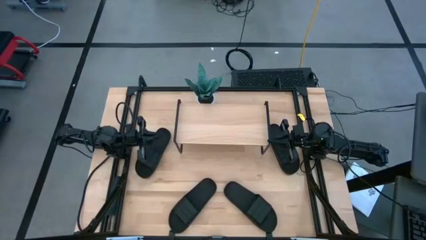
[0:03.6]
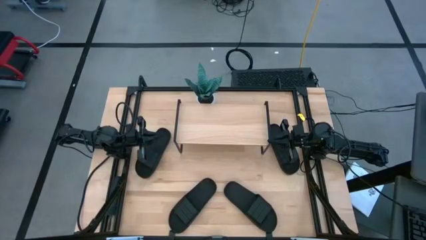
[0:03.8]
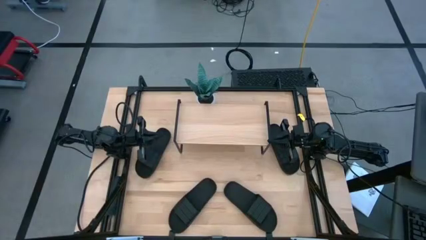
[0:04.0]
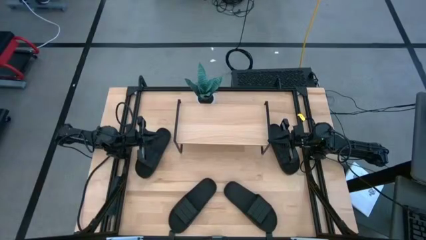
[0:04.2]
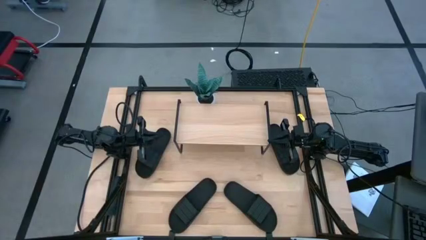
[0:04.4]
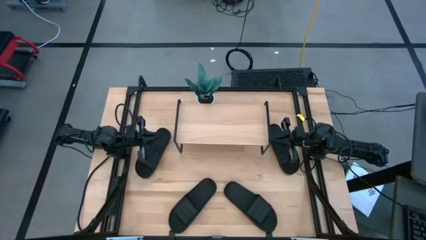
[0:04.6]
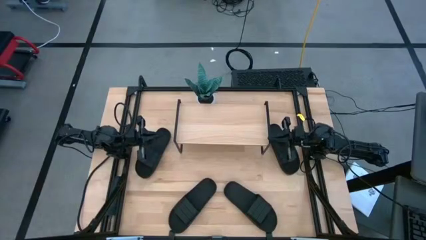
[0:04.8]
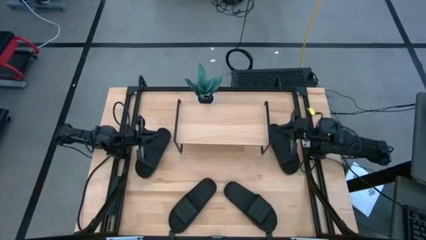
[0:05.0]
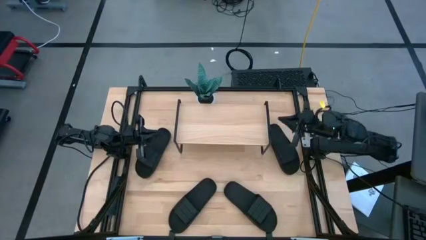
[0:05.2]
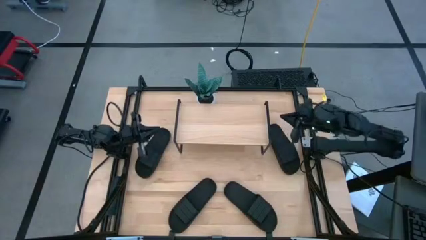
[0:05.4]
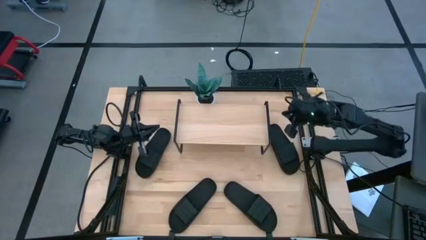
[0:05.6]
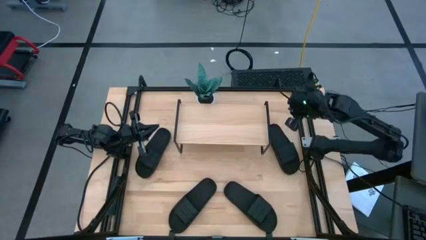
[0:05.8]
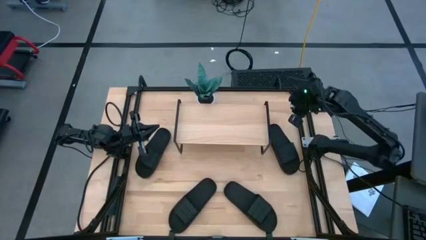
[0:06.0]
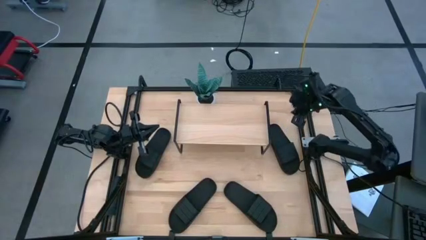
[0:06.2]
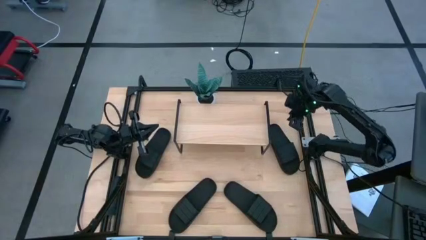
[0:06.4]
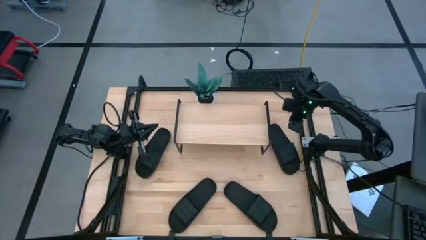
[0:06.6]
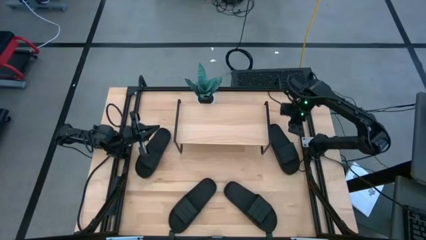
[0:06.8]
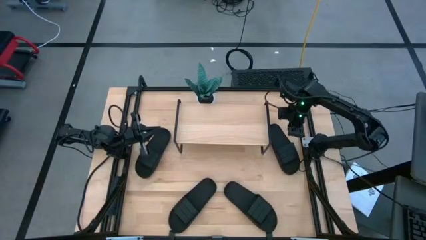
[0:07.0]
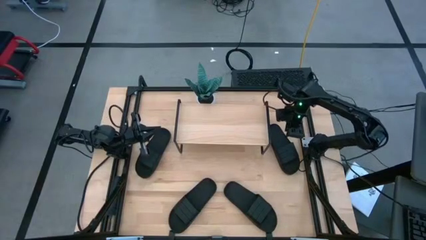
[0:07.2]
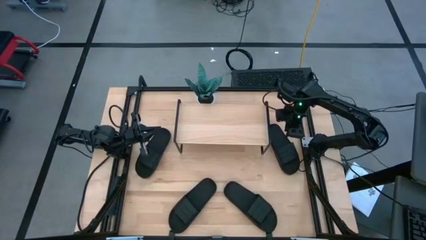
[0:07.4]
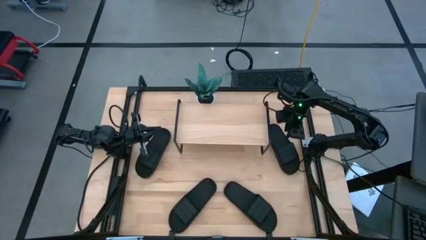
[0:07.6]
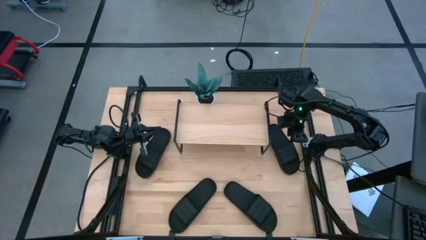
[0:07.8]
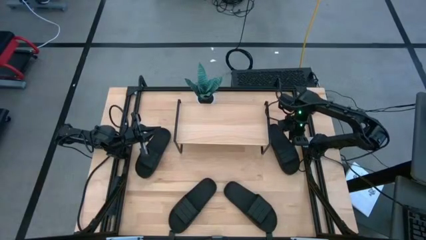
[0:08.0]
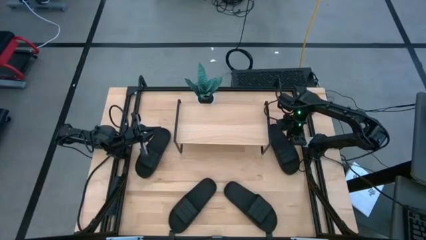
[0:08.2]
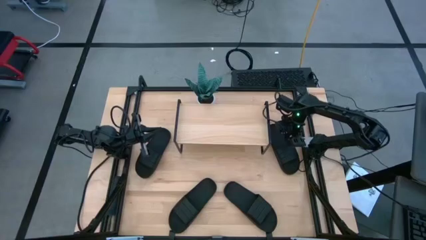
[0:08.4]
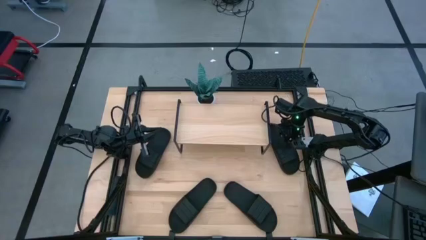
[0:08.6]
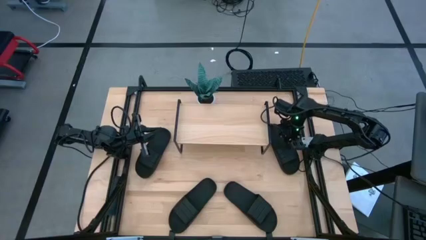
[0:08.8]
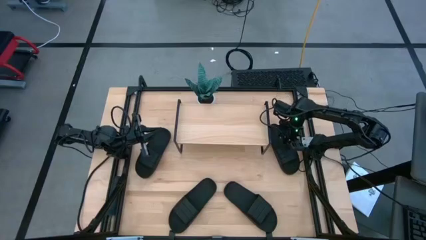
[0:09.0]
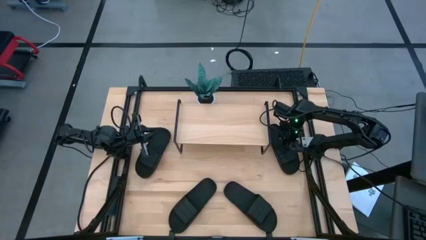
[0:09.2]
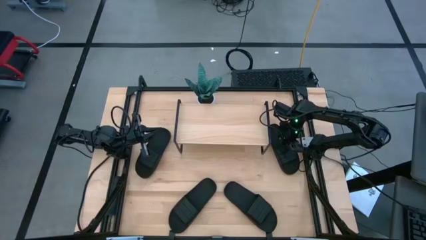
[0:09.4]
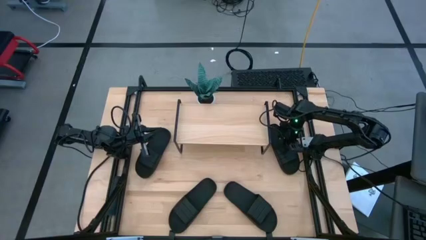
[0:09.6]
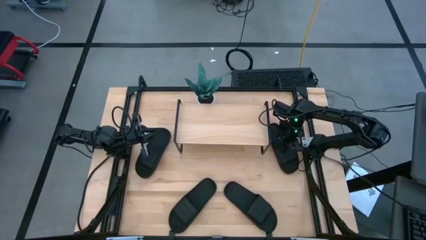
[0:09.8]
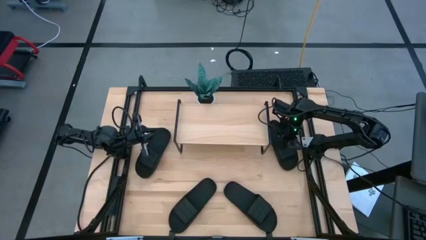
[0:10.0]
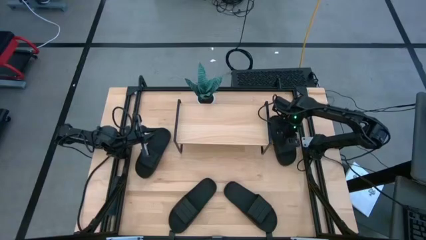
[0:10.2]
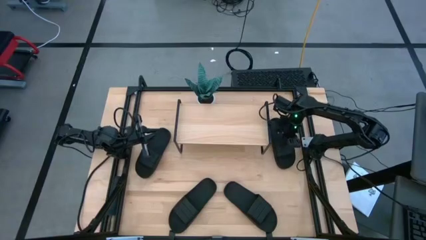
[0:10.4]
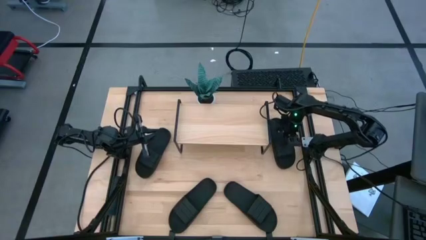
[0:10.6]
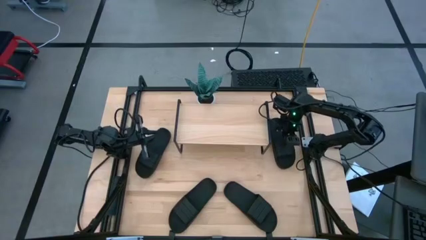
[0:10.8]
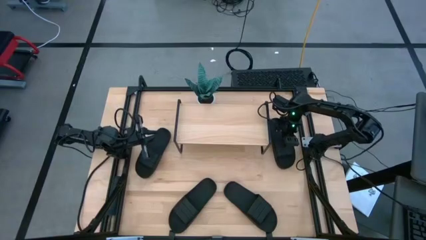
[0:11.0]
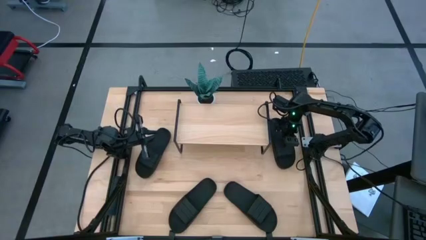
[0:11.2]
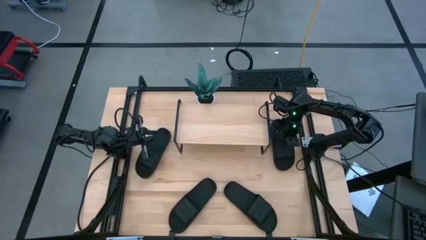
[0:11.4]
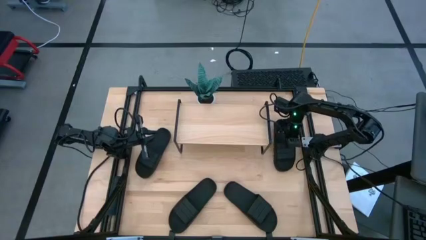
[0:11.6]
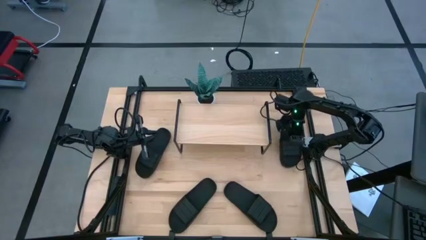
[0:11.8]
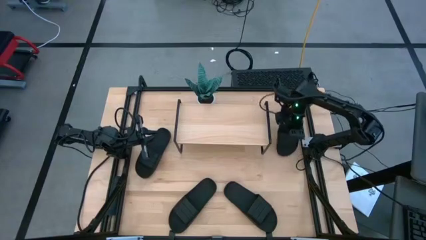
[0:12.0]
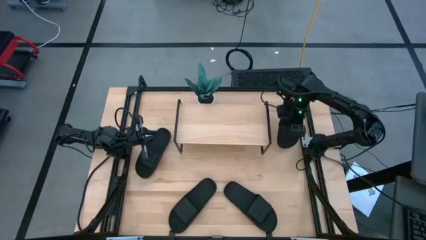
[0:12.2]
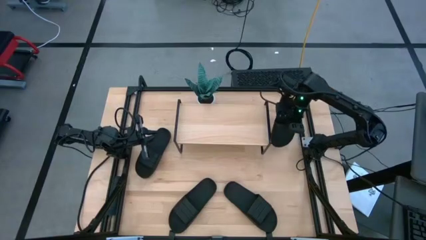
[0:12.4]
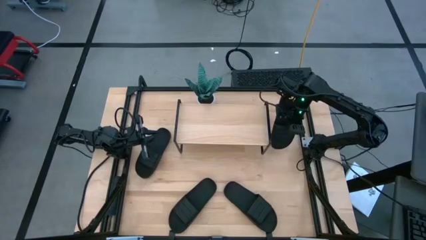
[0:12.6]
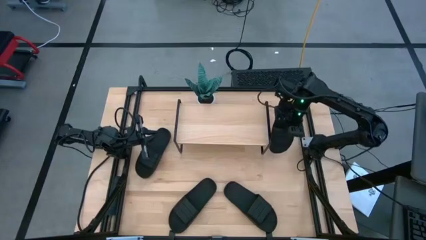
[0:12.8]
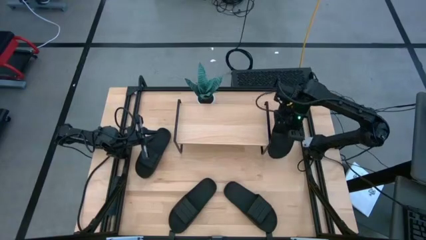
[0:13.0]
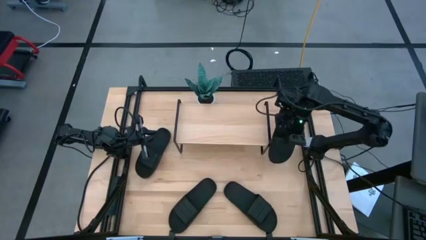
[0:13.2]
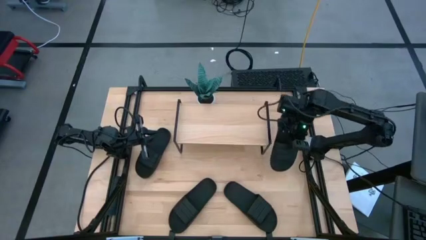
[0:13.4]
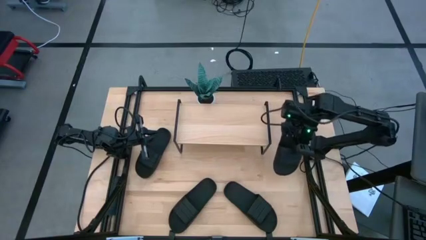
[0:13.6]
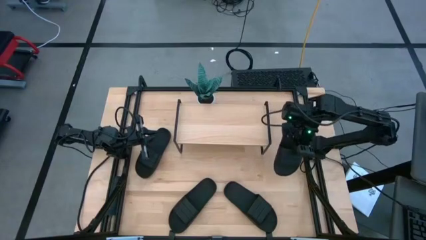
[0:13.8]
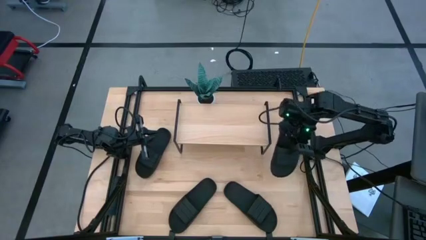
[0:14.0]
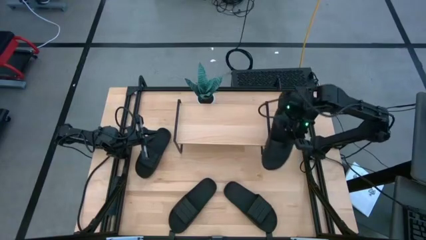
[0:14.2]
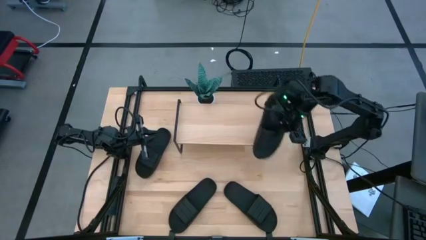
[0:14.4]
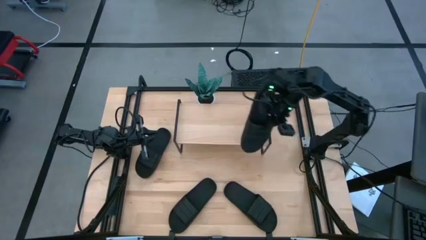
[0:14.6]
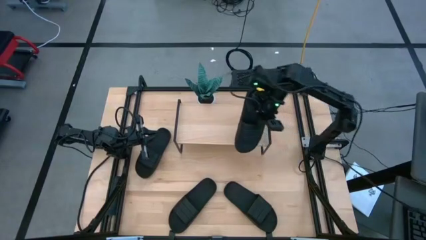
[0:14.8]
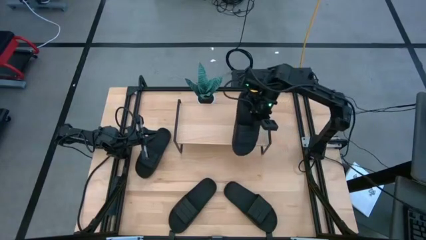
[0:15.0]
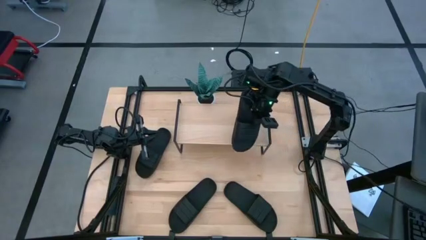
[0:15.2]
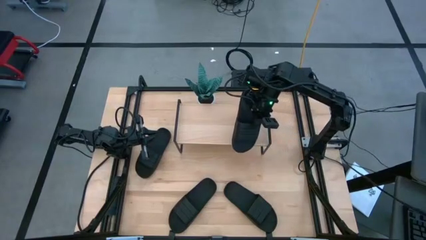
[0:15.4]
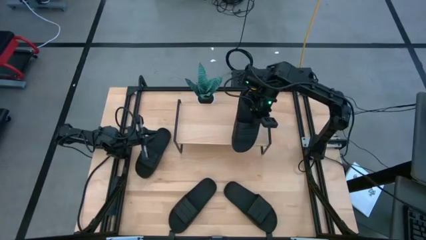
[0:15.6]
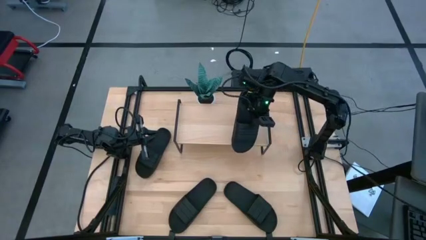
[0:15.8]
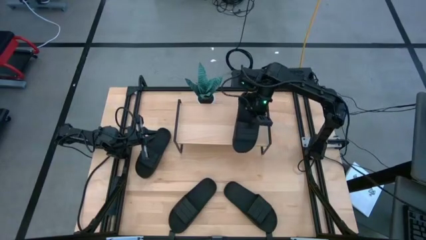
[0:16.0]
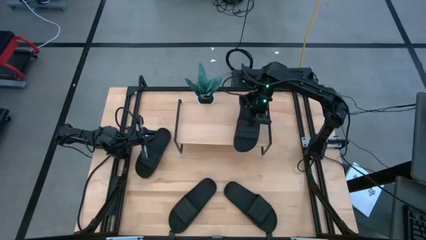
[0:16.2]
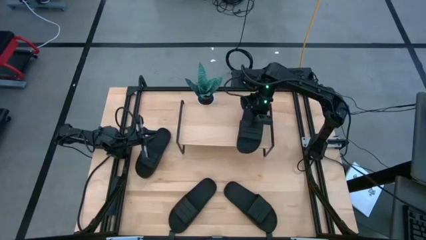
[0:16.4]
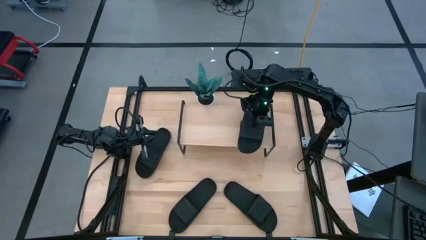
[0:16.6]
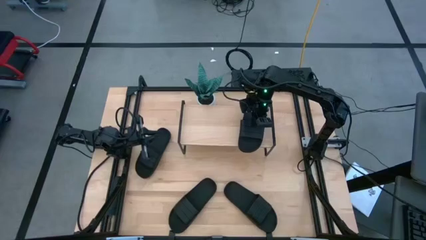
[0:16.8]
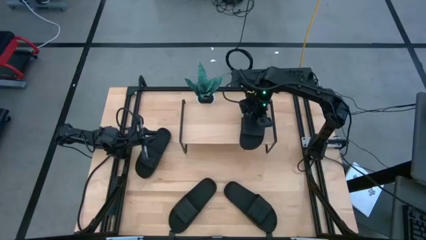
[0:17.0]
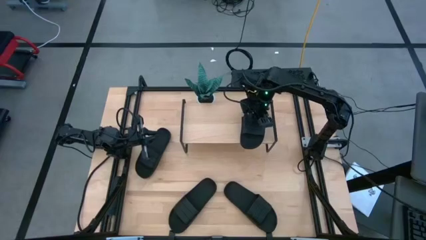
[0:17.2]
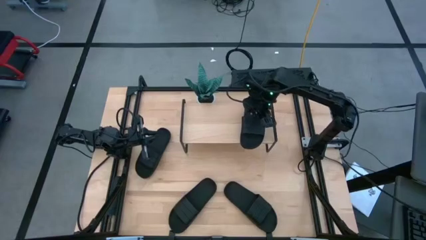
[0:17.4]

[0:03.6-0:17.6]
Task: Pick and place slides into the shelf
Put the top right black slide on the shelf
